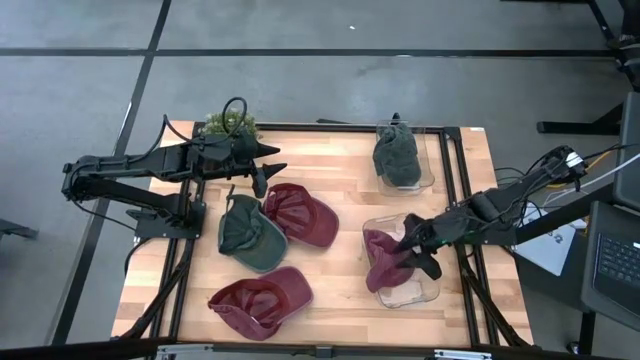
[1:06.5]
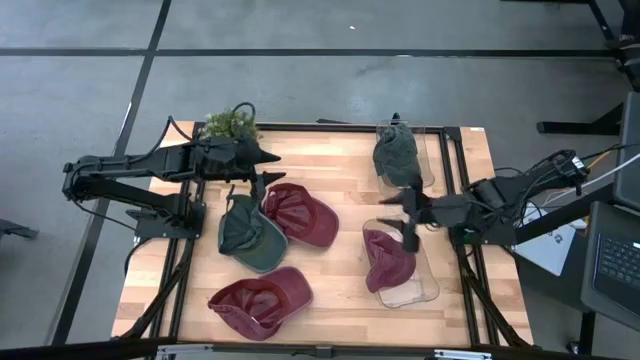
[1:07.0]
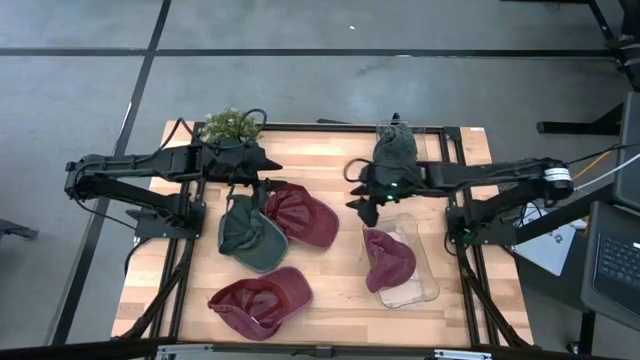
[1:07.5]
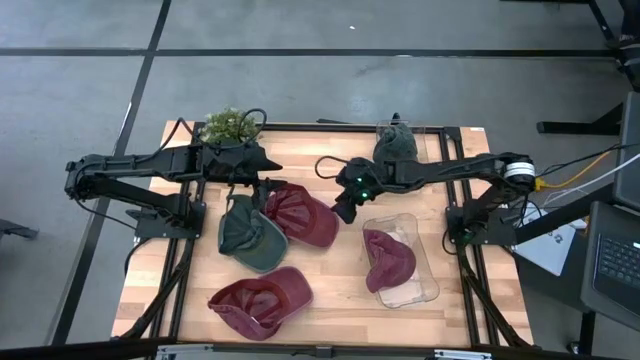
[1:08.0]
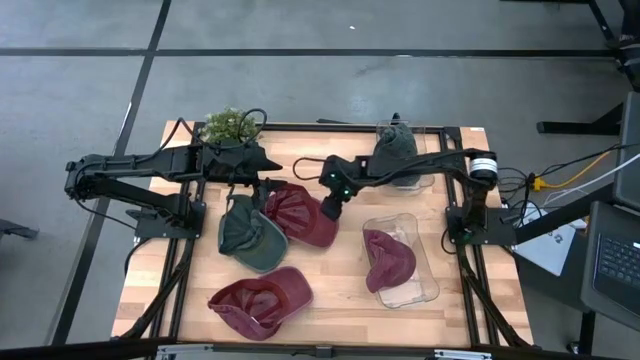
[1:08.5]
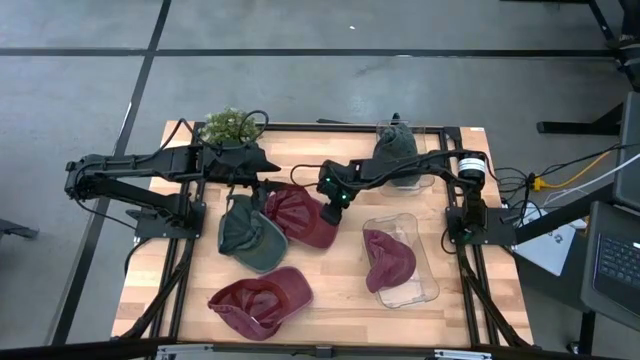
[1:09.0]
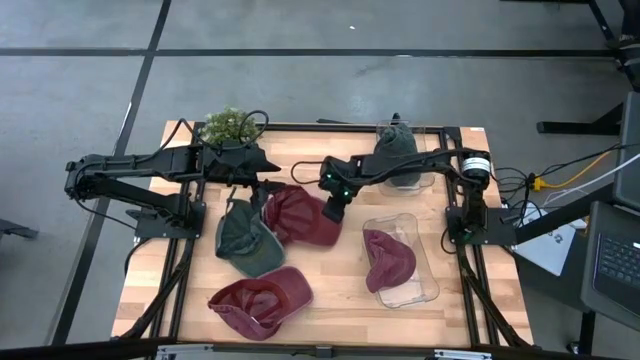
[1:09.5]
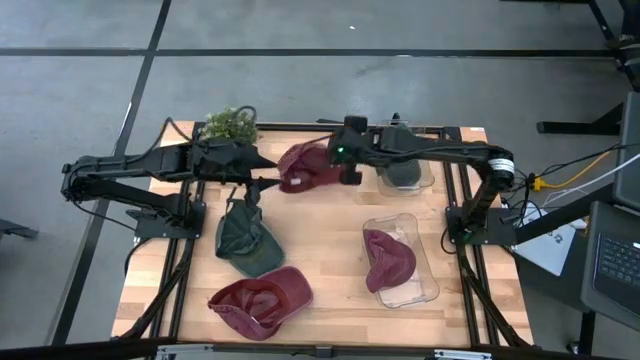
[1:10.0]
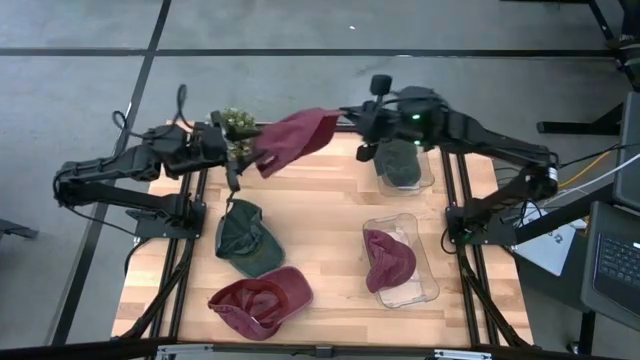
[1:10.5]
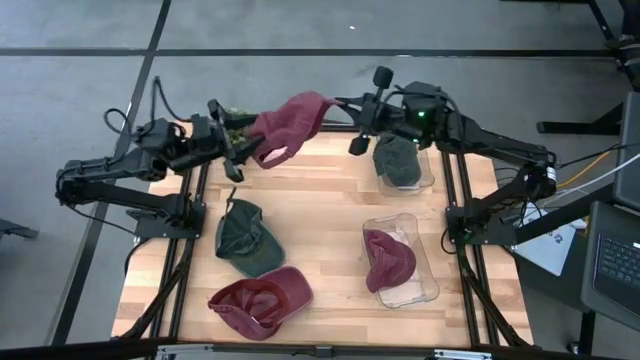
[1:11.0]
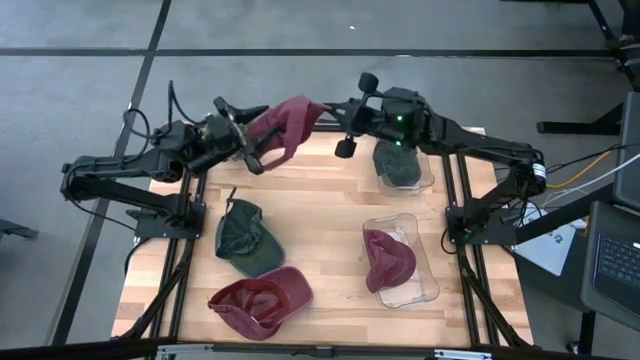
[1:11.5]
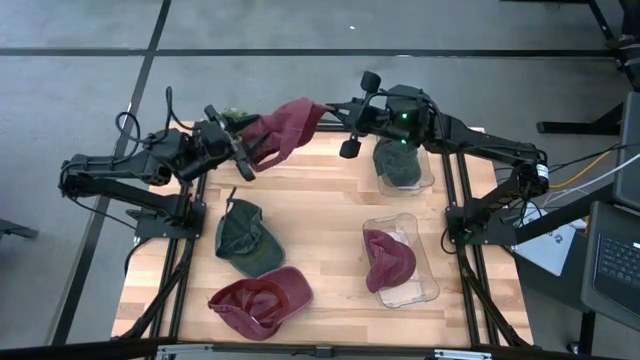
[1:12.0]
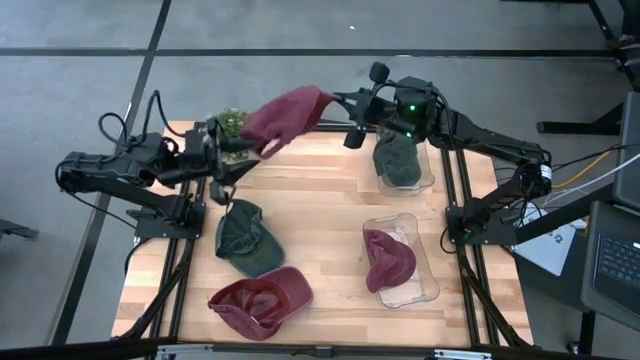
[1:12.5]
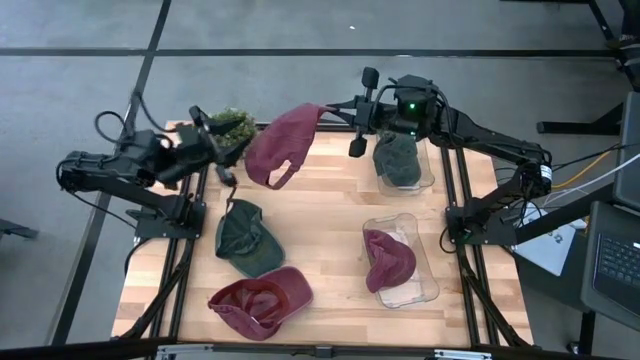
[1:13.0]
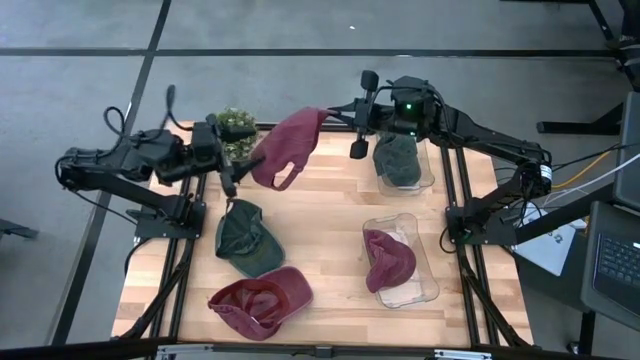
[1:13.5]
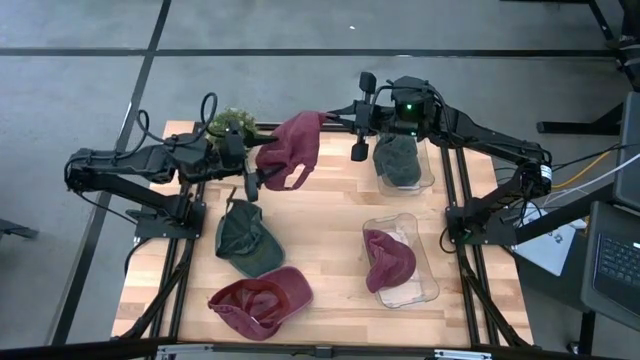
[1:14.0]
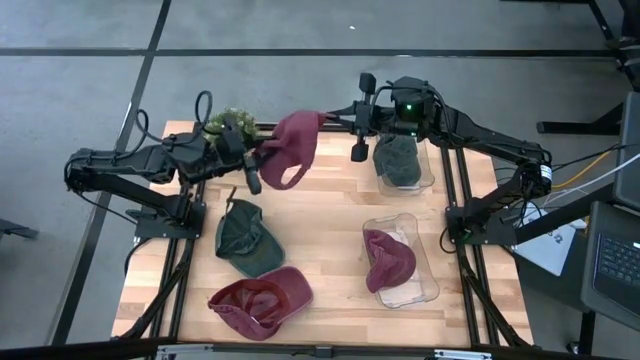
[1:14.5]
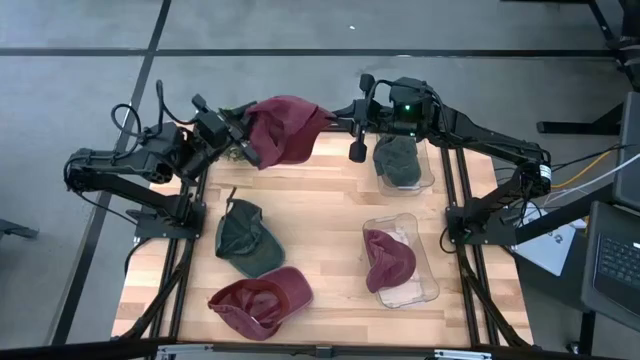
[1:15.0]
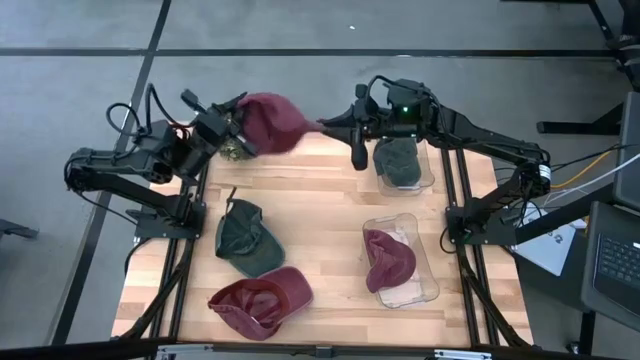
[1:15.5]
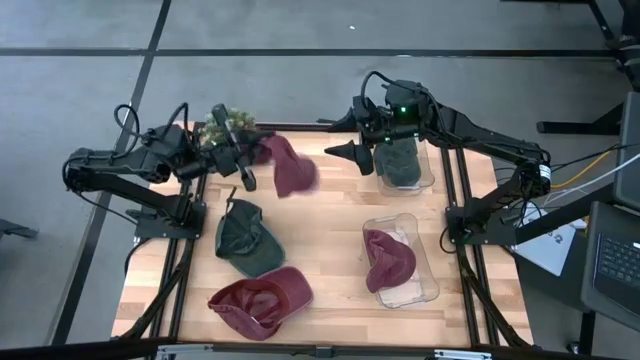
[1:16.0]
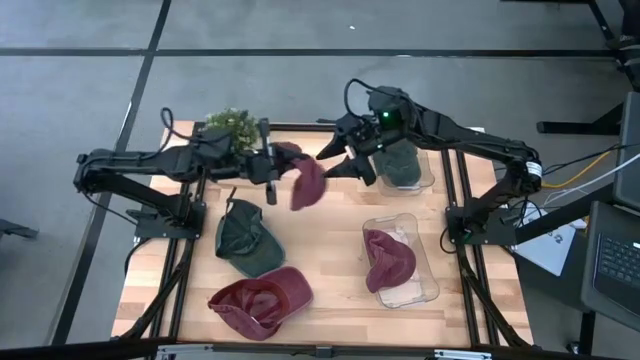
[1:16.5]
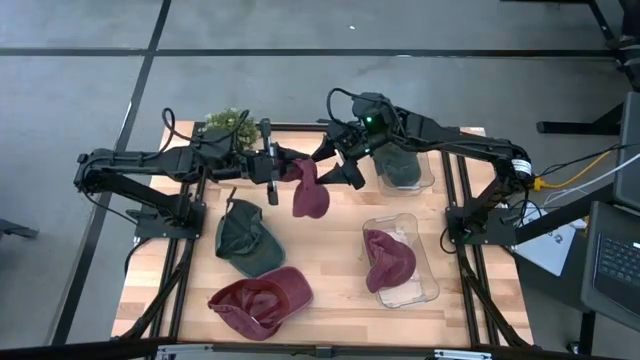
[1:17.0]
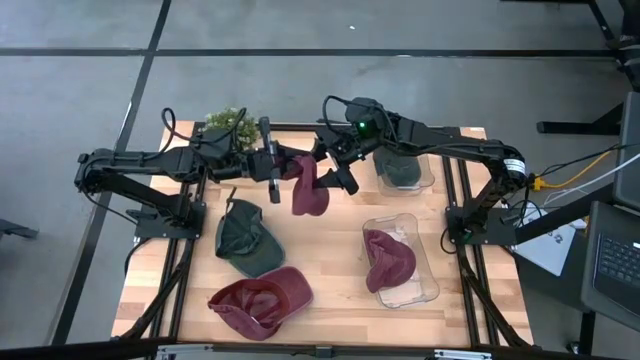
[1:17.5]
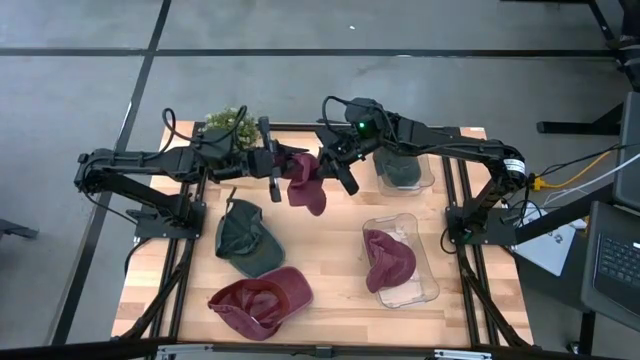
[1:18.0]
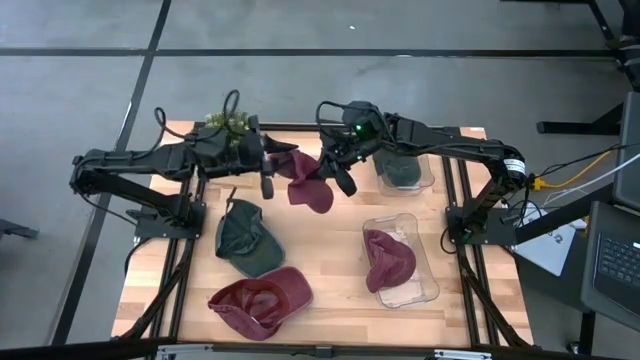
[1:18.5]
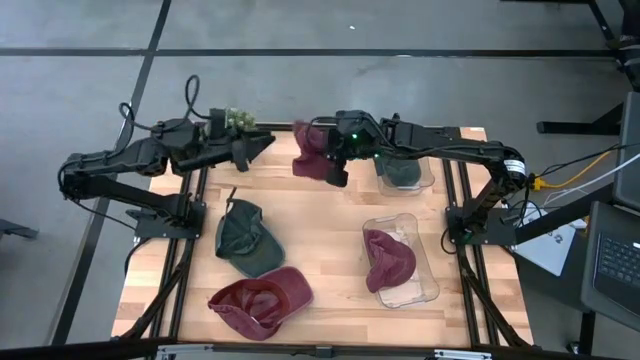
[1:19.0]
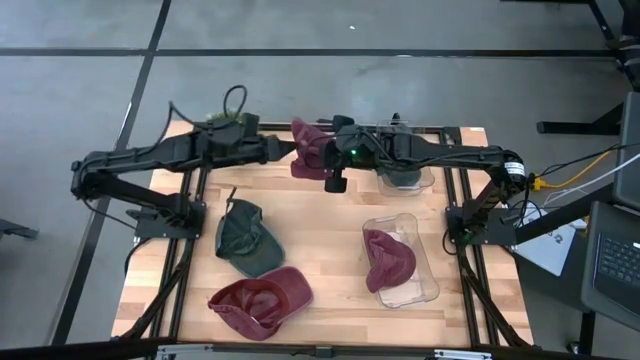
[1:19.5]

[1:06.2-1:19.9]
Task: Pick & Place hat
Put the top red cap into the bottom transparent bin

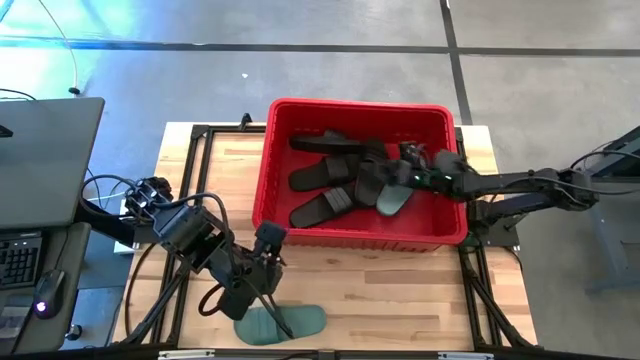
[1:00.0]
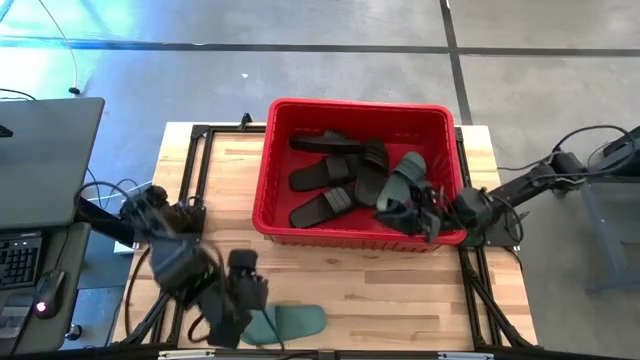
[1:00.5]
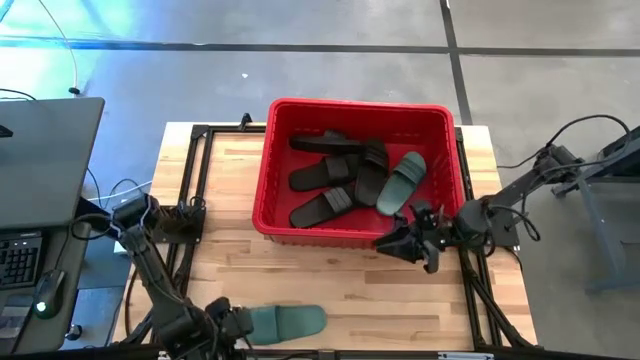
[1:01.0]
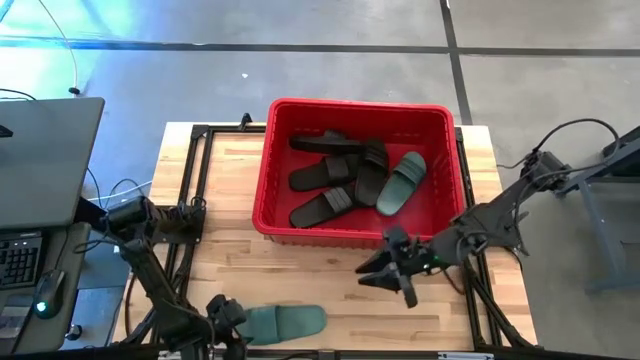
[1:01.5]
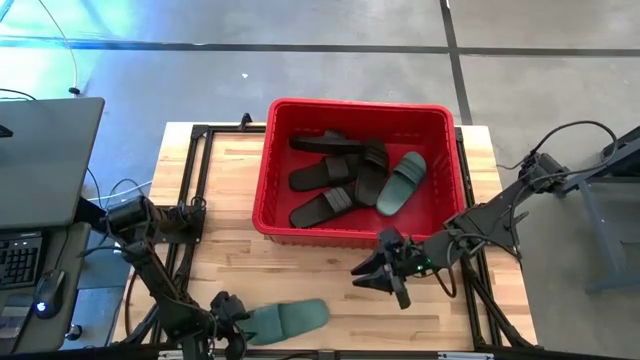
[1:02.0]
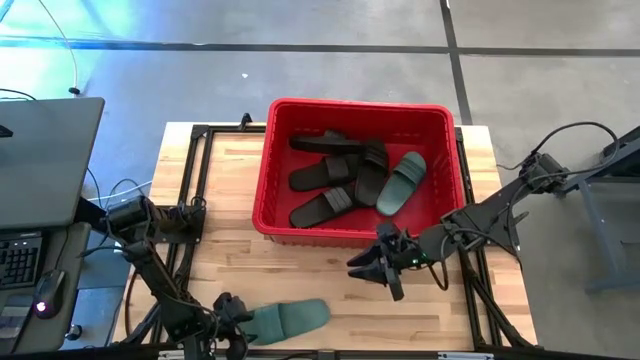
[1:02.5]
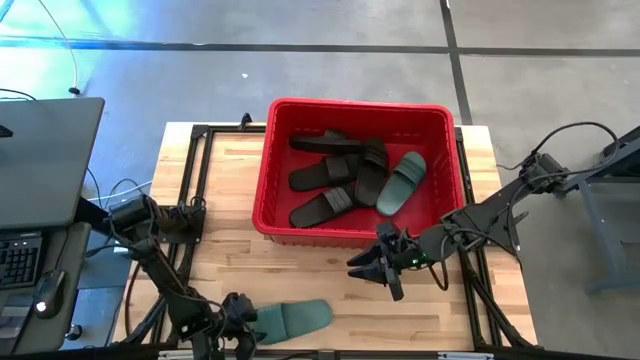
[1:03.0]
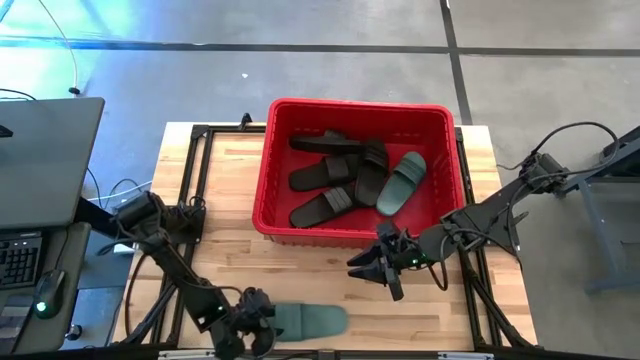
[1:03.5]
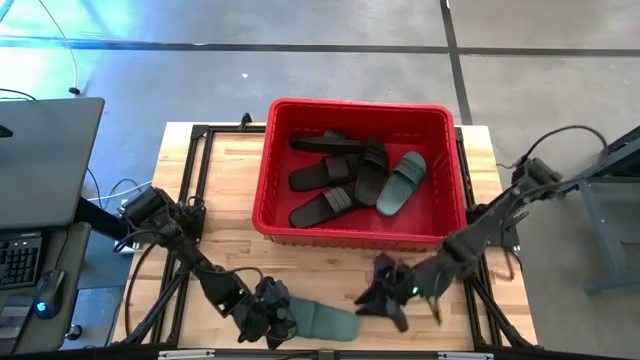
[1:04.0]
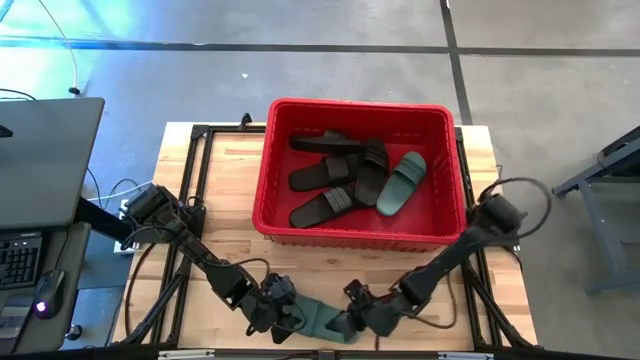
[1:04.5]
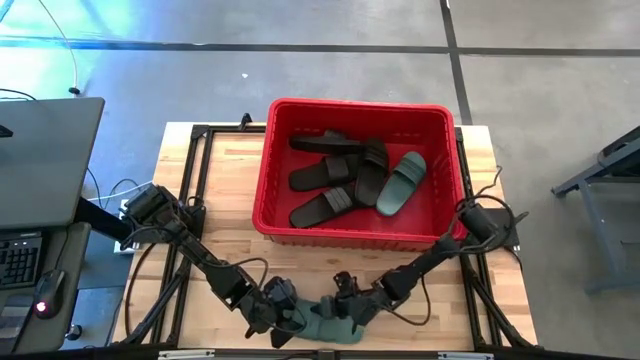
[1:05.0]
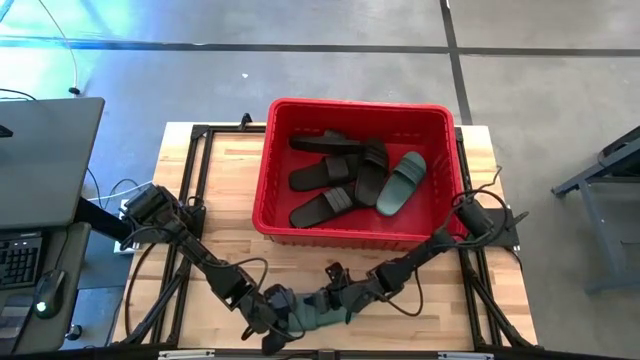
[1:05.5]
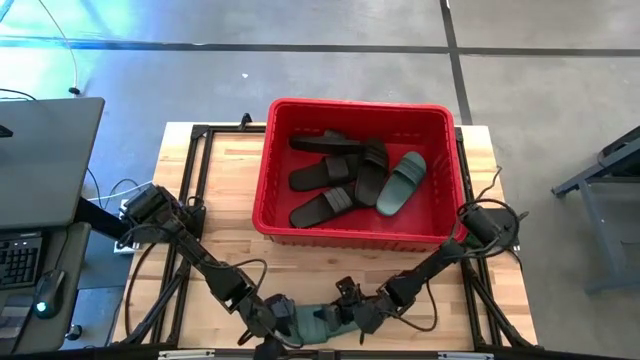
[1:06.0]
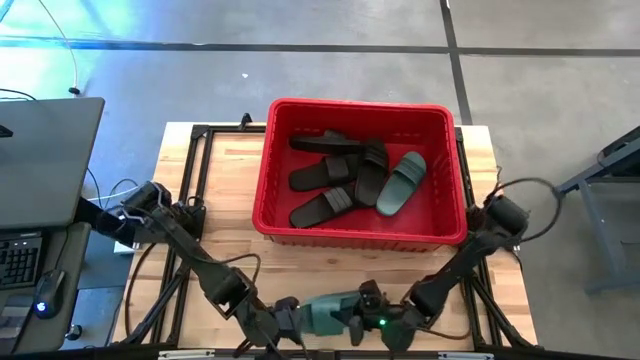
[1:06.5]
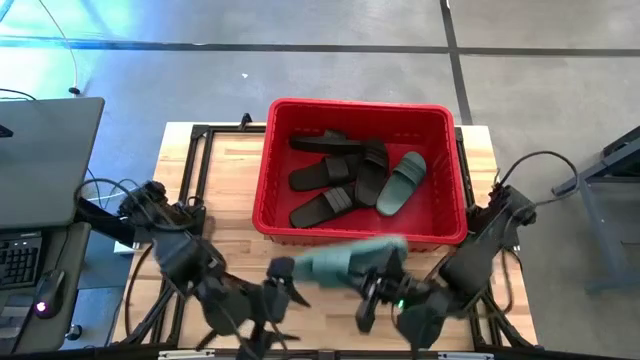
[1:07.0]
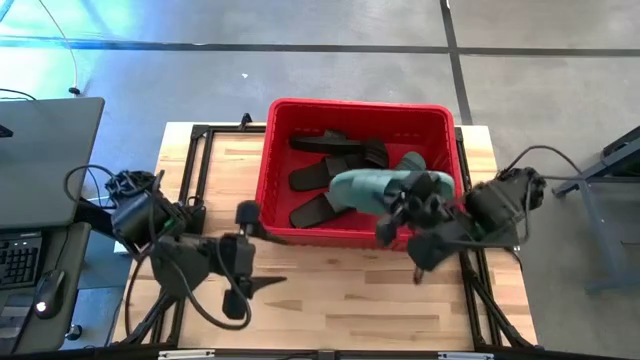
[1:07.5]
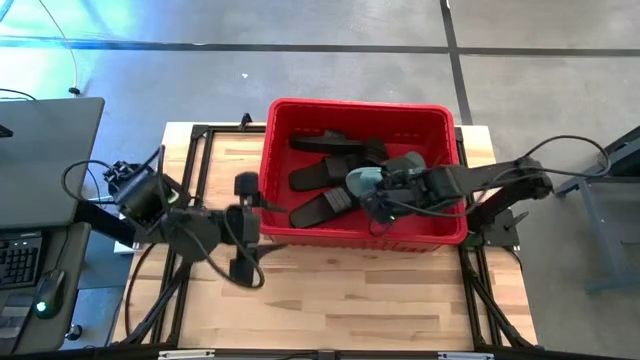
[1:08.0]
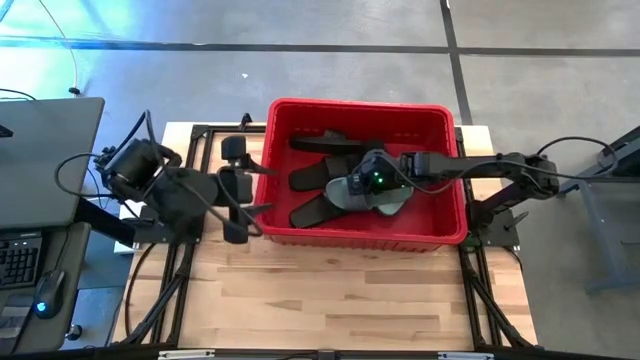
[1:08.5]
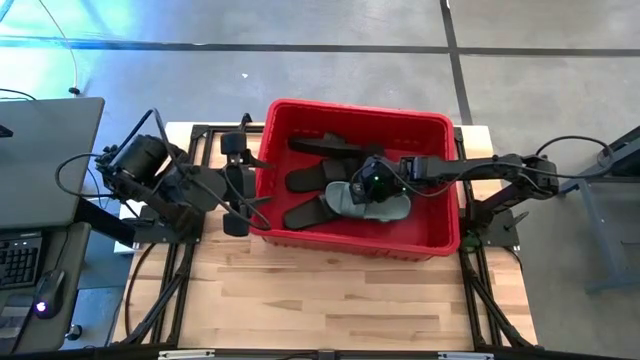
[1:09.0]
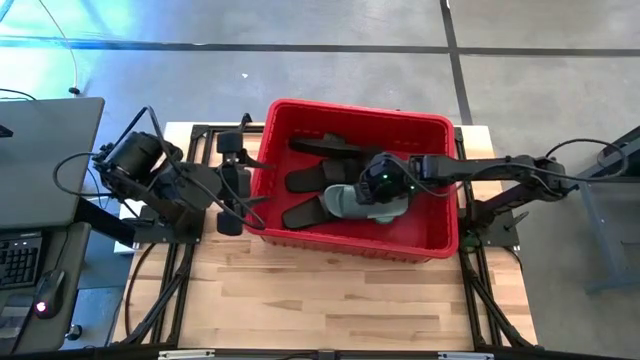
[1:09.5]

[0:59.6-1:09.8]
Task: Pick and place slides into bin
Put the green slide into the red bin
